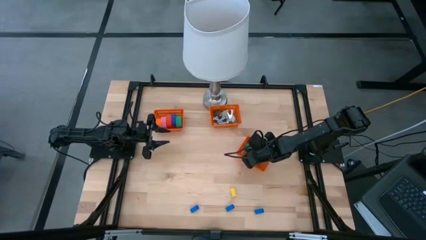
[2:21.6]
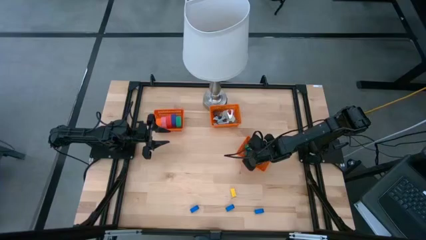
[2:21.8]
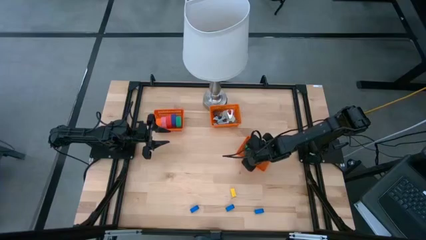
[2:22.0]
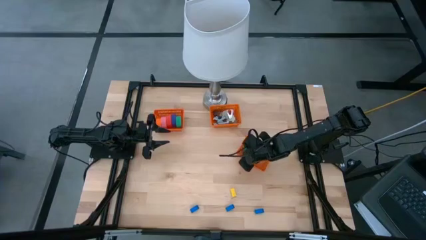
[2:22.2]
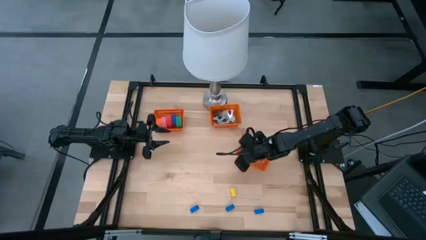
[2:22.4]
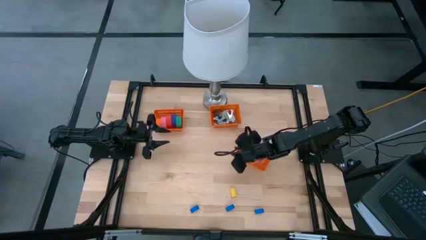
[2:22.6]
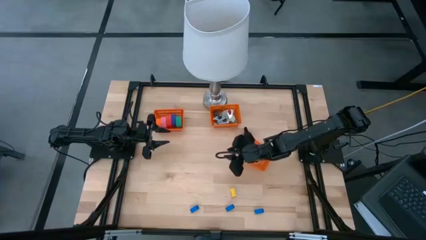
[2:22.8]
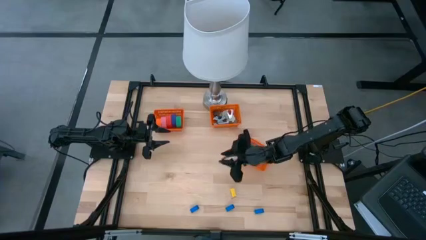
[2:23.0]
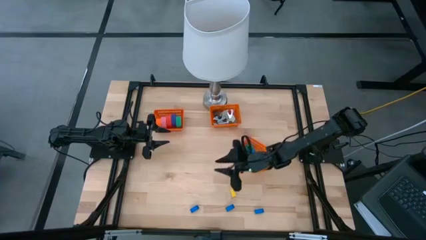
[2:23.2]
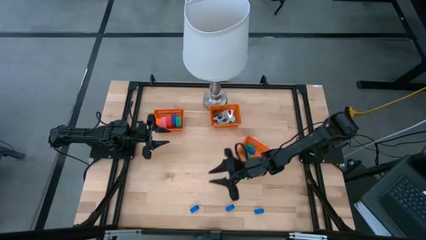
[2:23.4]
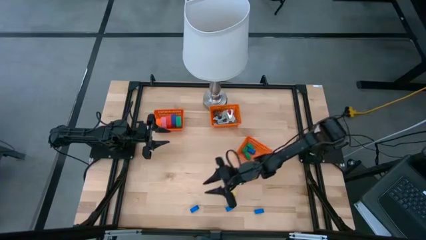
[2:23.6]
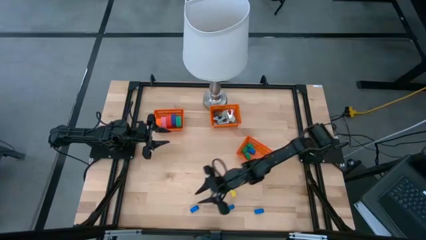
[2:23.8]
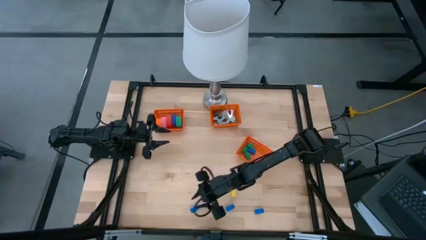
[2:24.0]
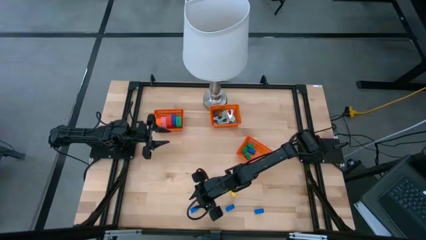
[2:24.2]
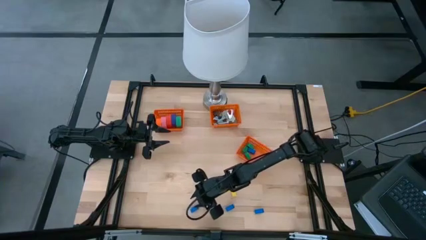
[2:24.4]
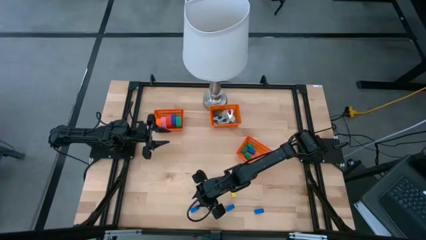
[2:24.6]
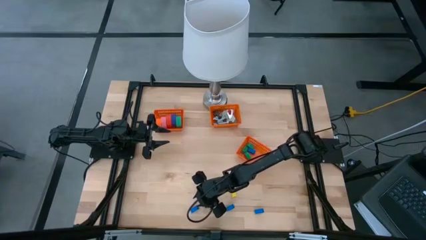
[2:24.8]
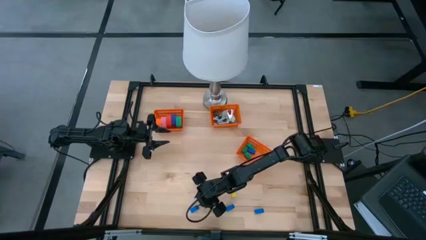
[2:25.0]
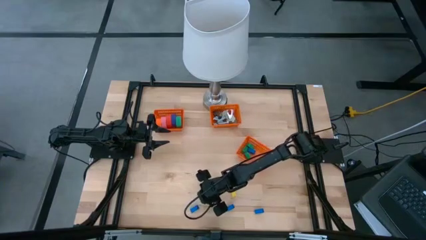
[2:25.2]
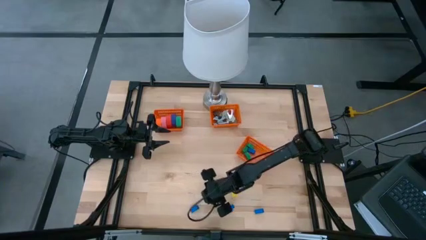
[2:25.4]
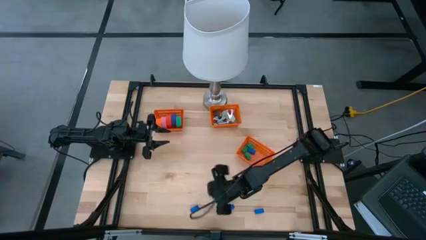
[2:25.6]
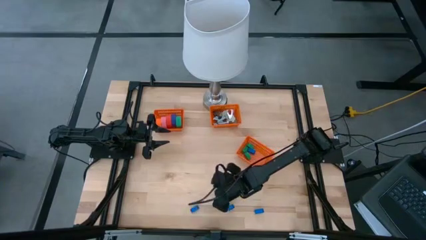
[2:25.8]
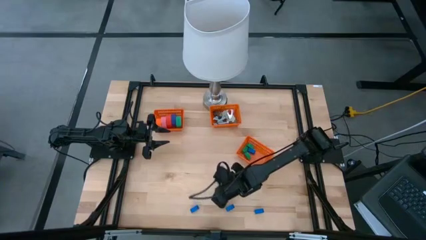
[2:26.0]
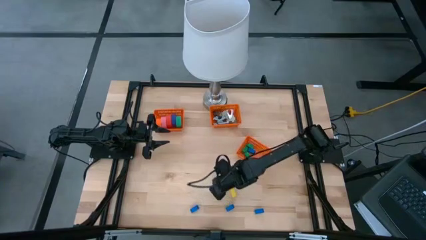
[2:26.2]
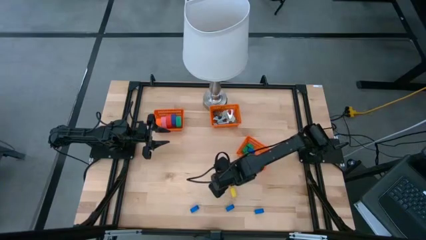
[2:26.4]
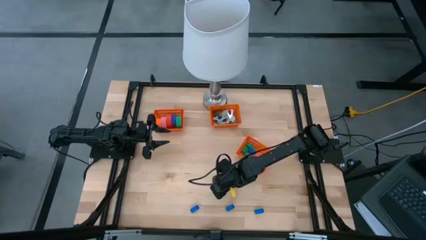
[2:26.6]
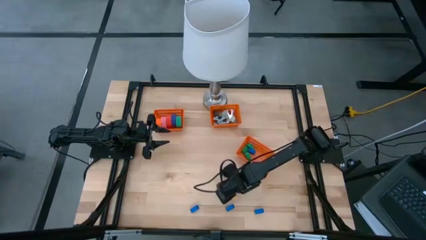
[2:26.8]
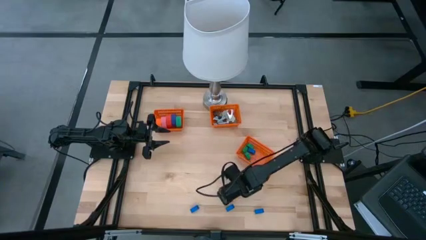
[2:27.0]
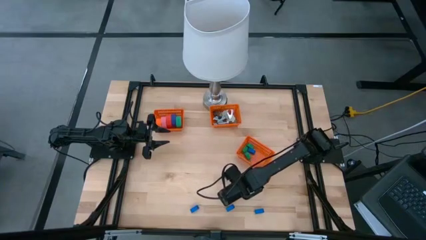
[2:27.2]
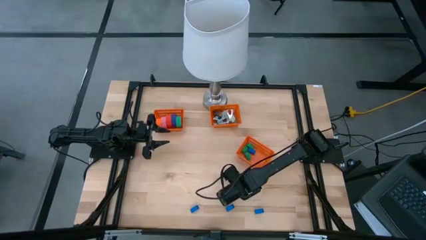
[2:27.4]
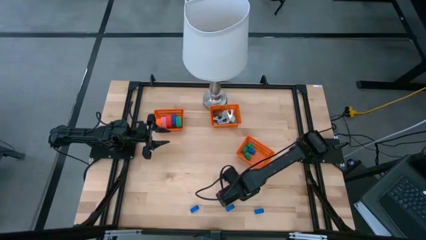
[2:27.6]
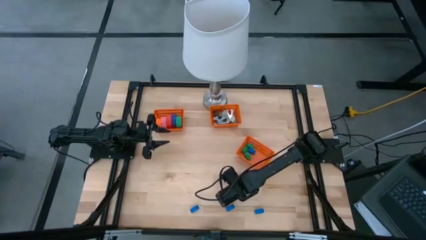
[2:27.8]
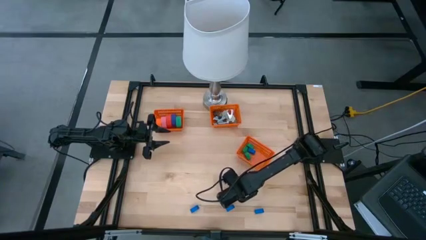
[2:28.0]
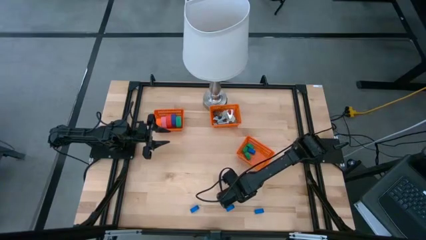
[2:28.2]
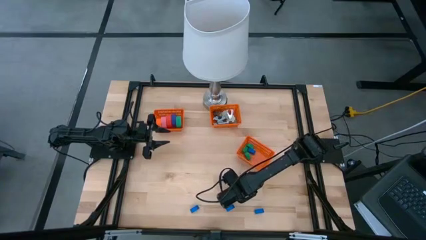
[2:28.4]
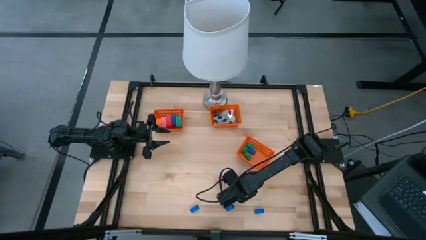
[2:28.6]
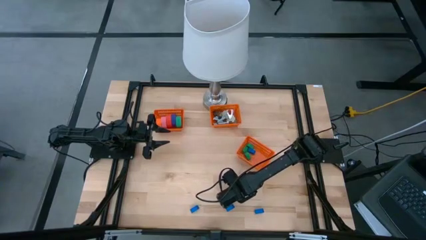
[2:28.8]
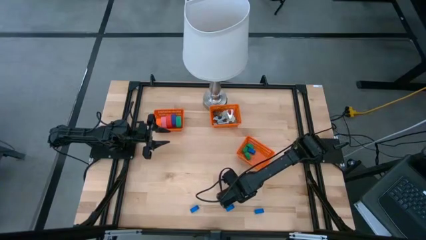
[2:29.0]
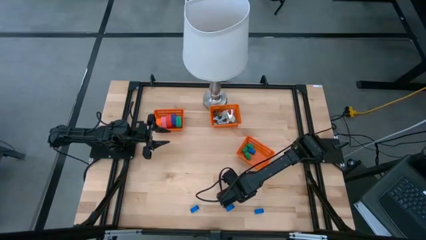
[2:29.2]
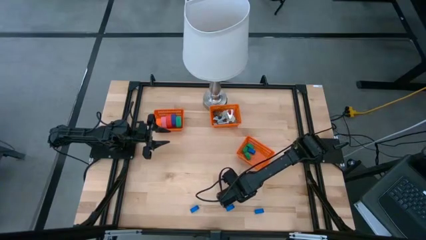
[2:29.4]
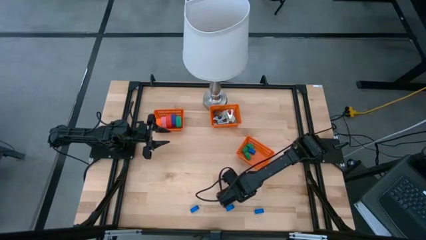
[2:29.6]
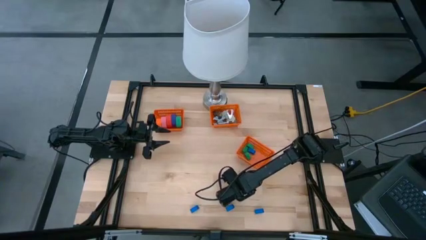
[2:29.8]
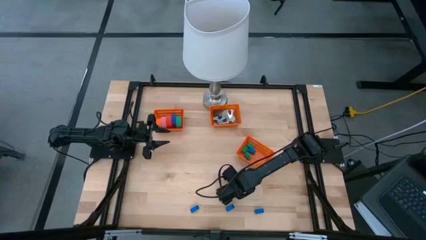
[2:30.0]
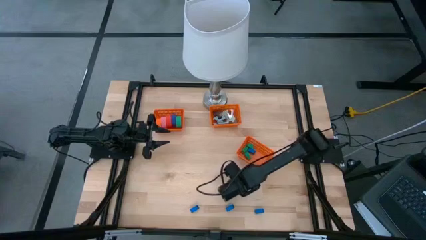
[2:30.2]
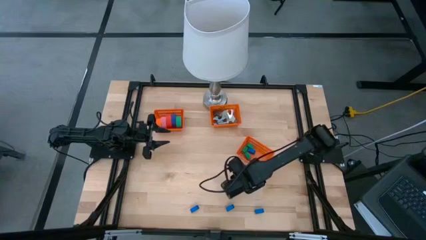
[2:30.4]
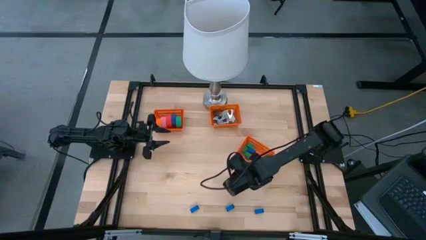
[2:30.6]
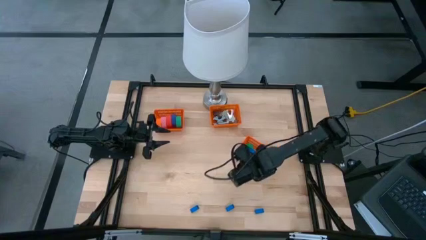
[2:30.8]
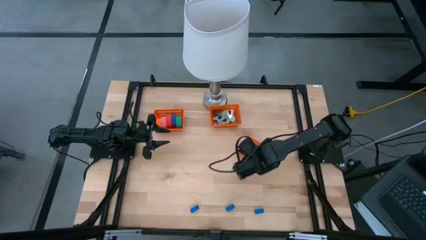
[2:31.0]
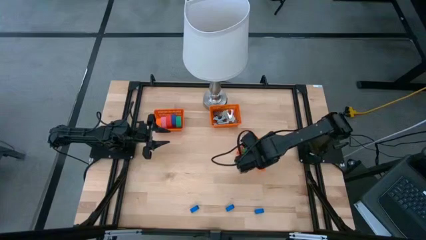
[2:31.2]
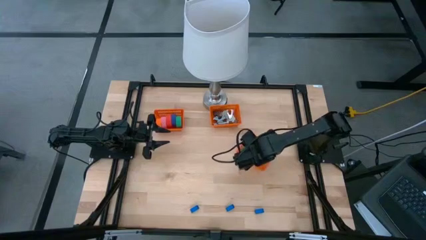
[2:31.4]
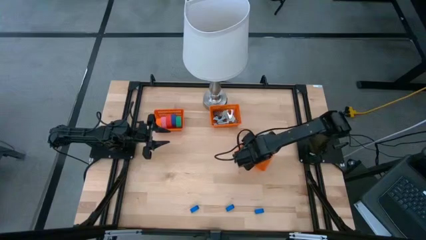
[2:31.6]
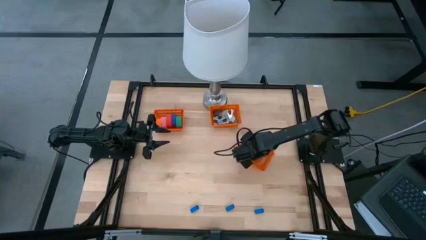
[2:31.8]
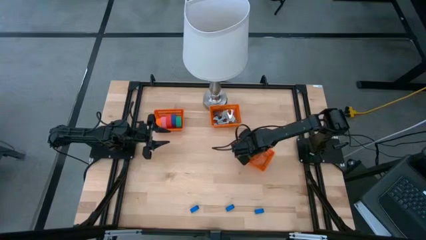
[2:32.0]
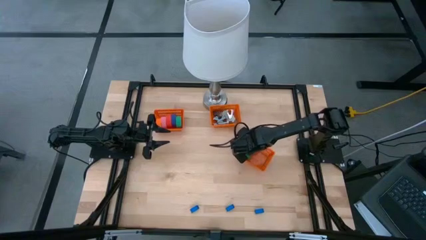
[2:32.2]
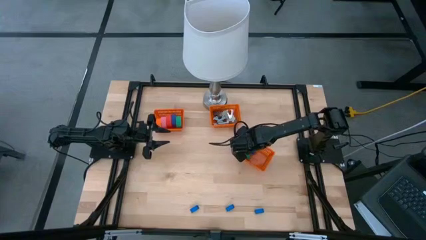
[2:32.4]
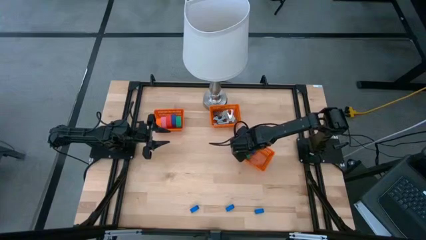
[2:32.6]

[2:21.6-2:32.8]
Task: Pick and place Stapler, Stapler remover, tape
Put the yellow stapler into the bottom orange bin

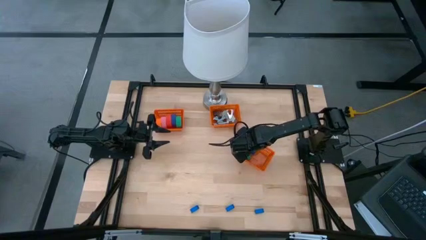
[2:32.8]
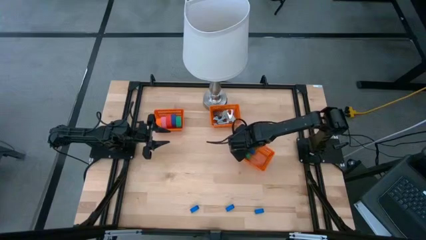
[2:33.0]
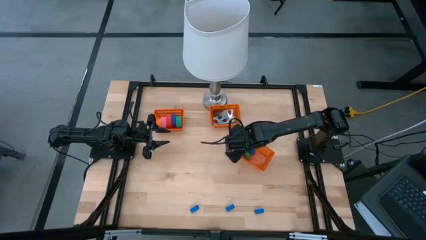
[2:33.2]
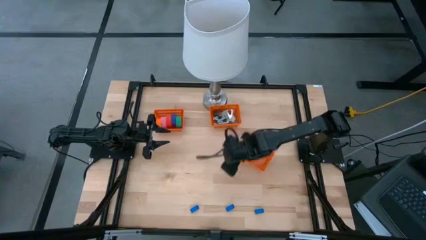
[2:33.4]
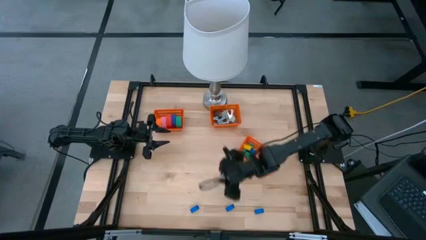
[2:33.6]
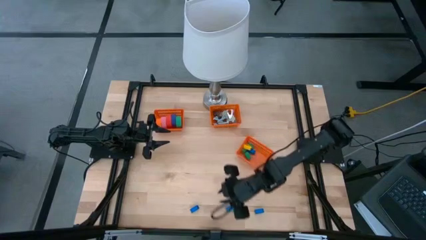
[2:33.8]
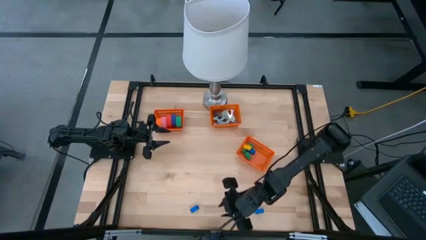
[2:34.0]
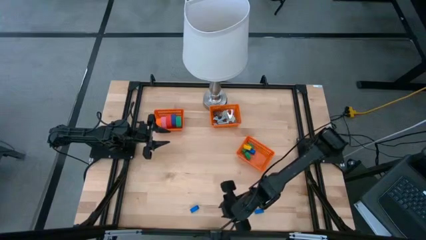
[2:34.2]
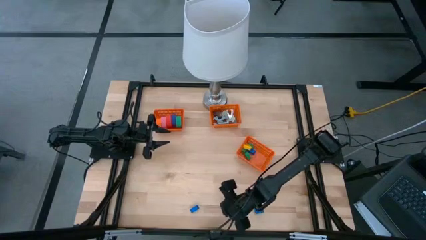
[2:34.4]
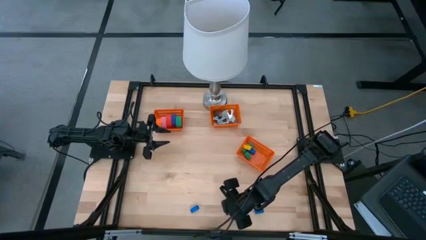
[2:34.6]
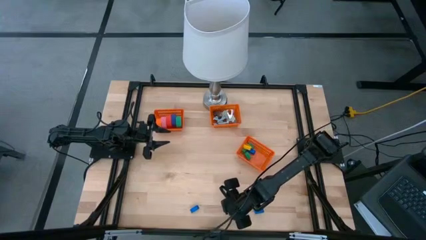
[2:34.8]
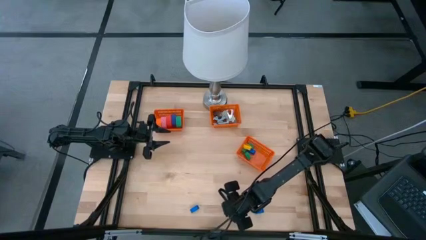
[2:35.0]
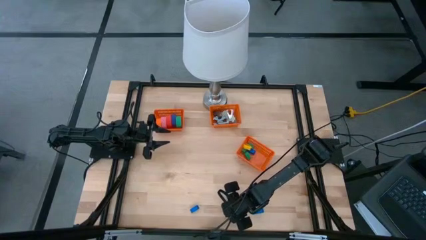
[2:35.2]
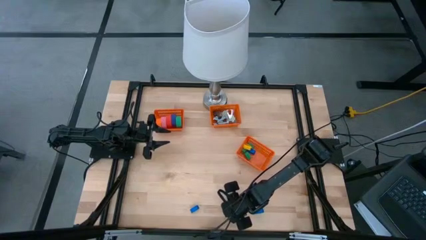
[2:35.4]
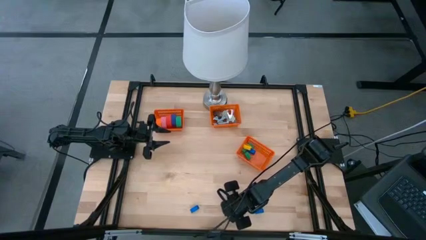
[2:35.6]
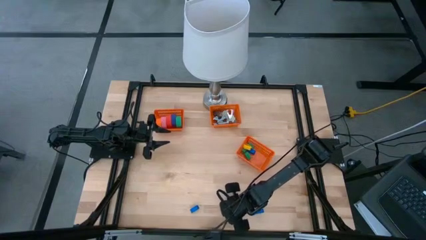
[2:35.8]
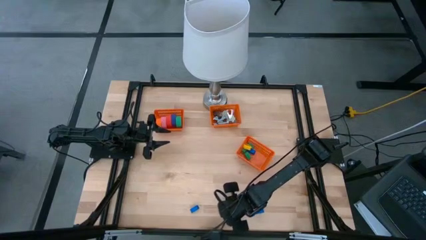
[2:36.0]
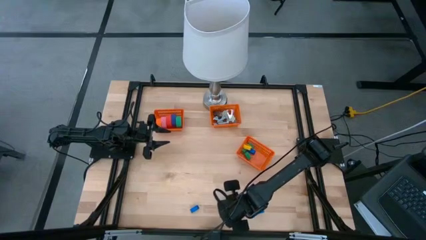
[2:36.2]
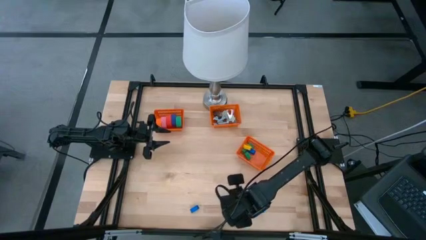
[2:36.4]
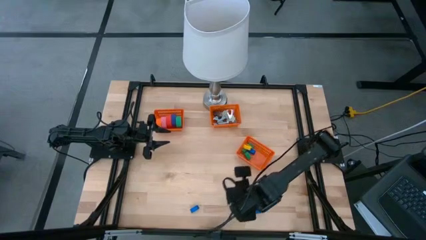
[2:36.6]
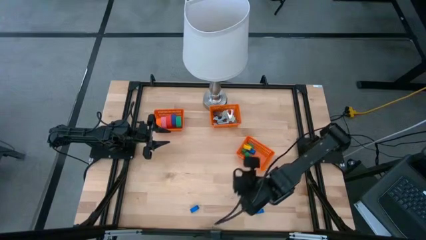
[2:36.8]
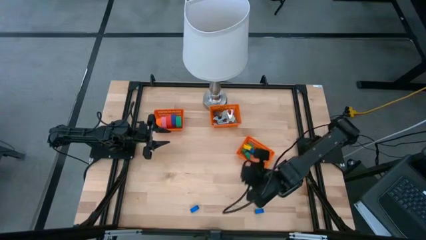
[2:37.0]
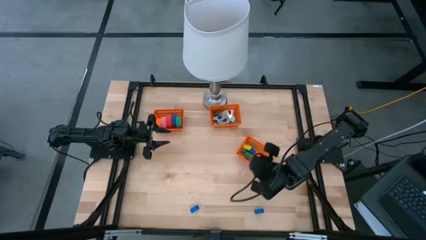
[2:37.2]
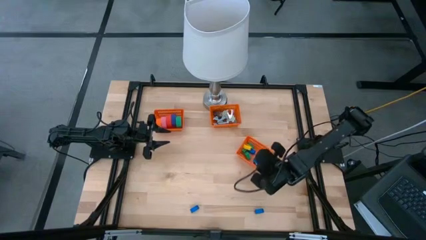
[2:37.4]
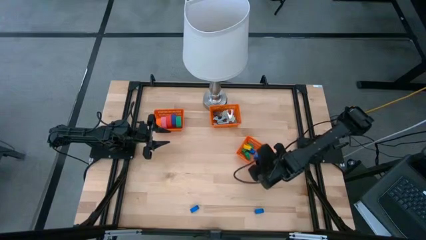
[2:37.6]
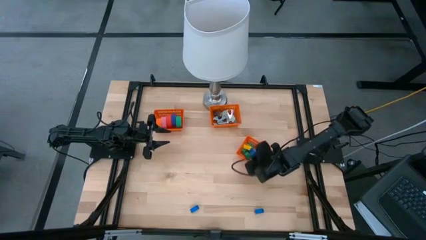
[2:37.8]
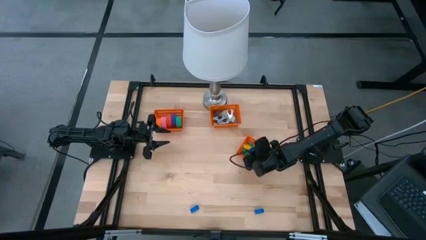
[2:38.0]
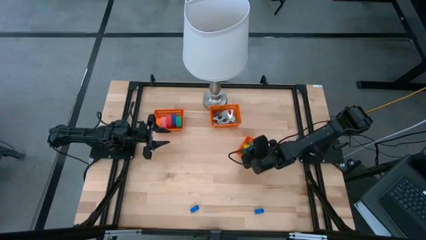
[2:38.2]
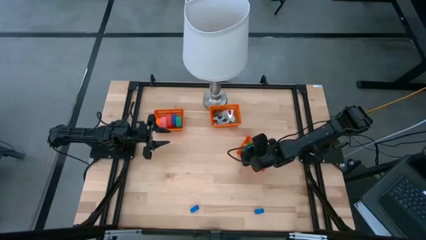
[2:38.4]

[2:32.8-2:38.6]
Put the blue stapler into the bottom orange bin
